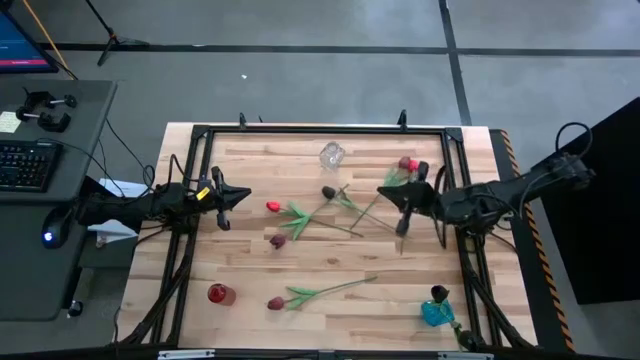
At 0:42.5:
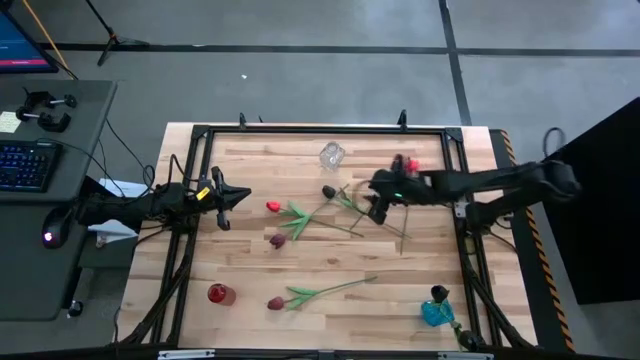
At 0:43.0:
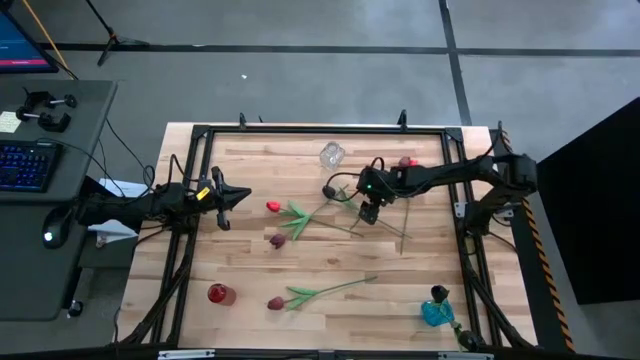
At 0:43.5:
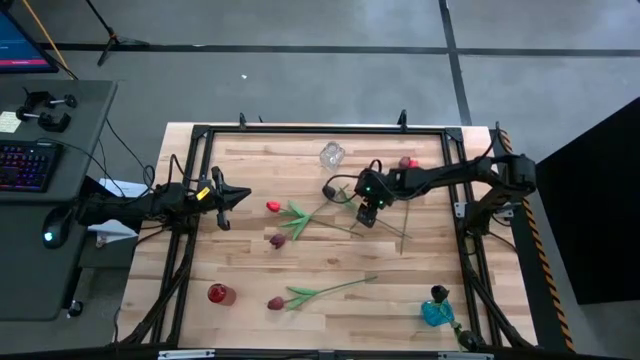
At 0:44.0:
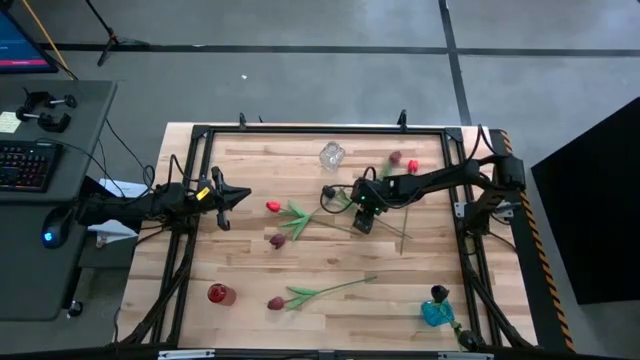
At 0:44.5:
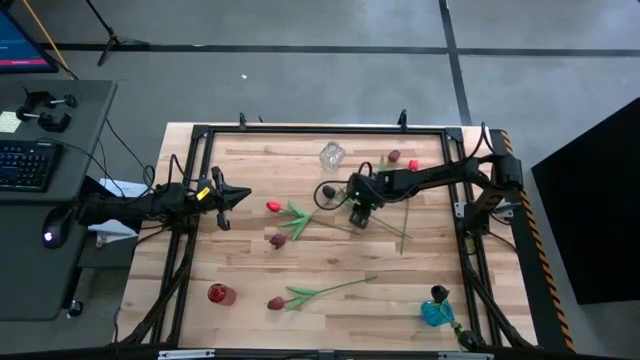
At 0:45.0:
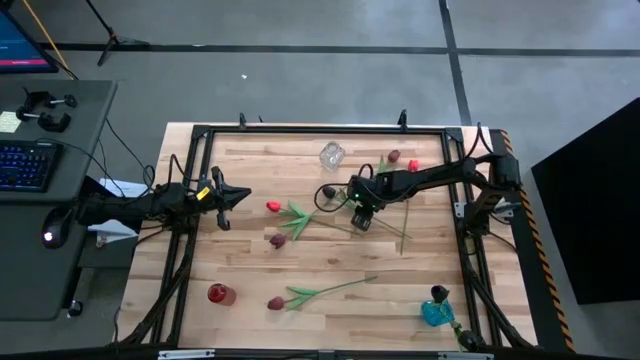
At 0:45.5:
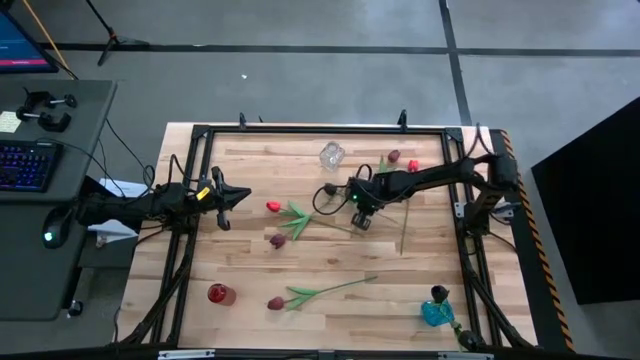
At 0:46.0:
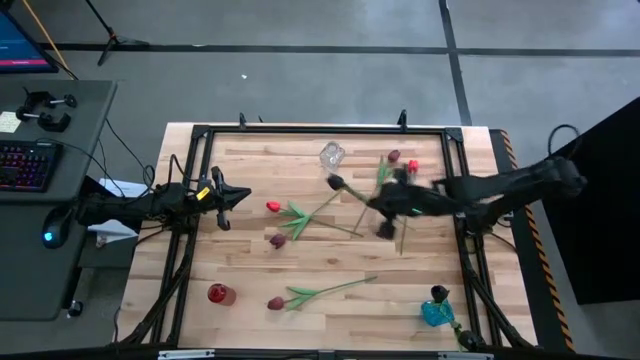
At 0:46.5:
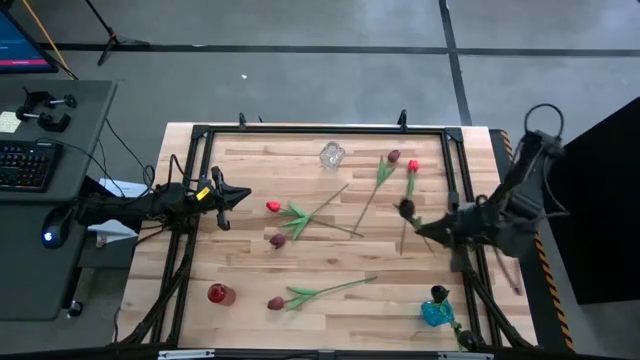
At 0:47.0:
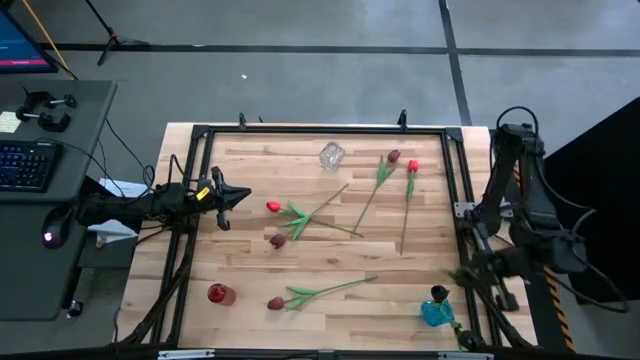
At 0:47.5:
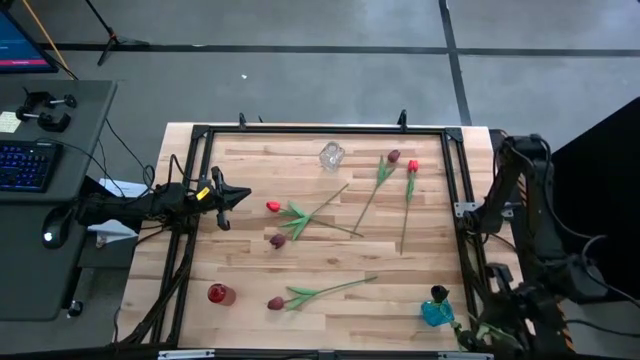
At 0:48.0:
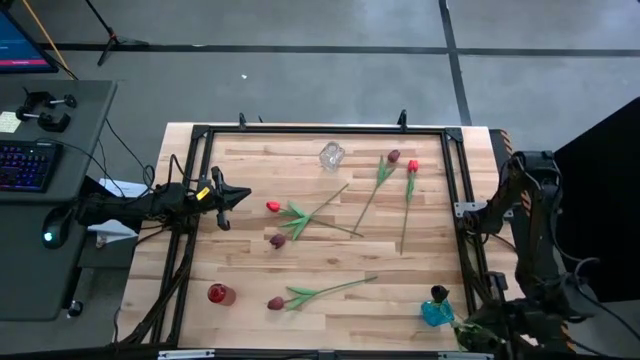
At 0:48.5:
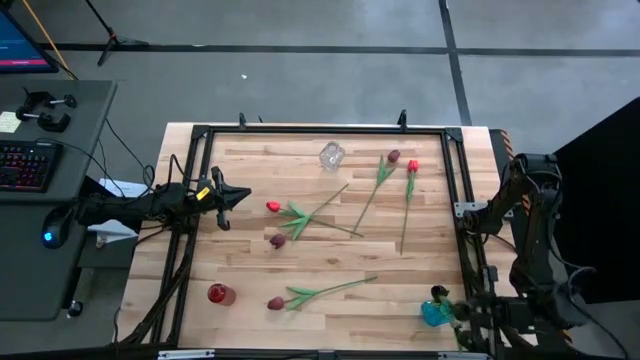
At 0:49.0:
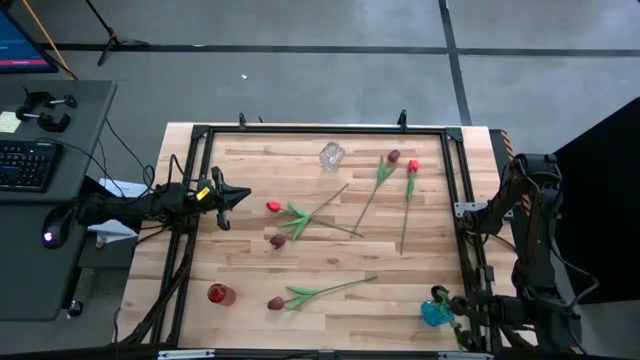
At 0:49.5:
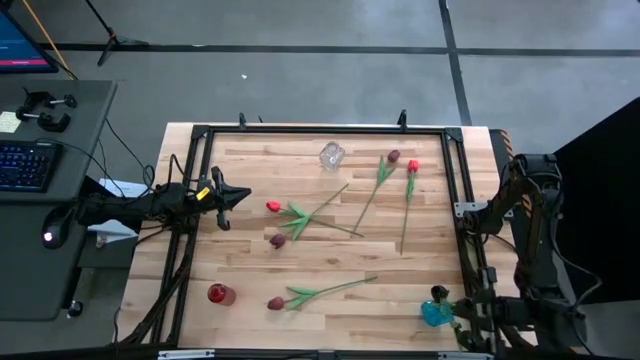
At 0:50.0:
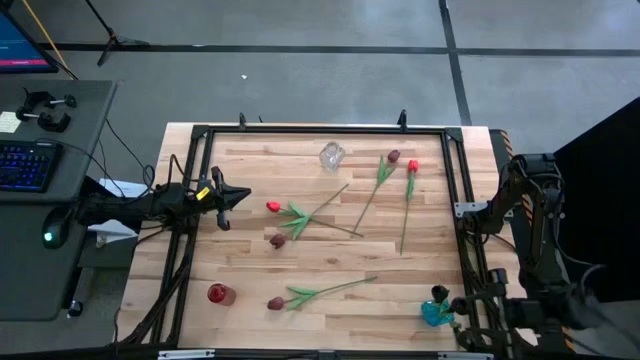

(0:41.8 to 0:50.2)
Task: Sort flowers into vase by color
Put the black flower into the blue vase

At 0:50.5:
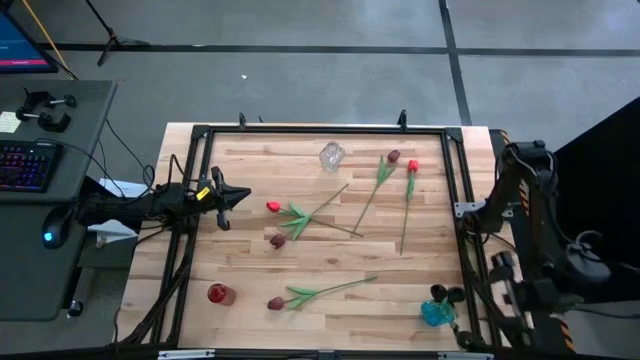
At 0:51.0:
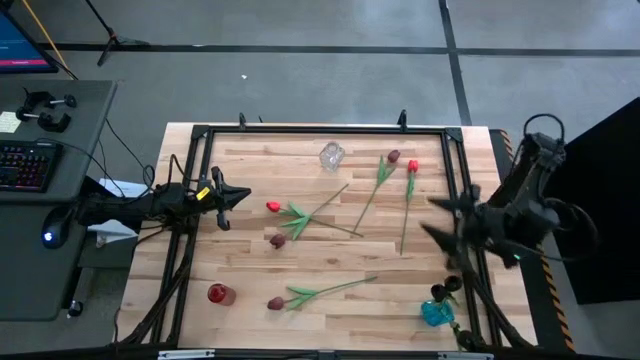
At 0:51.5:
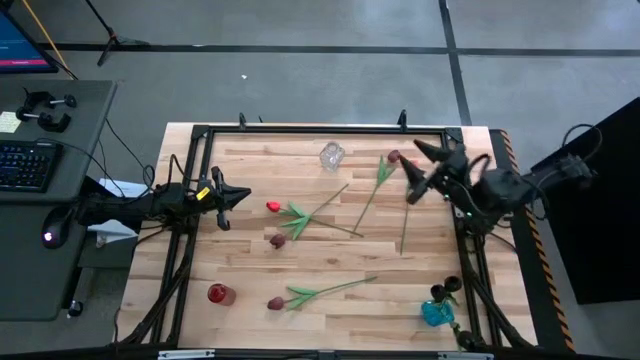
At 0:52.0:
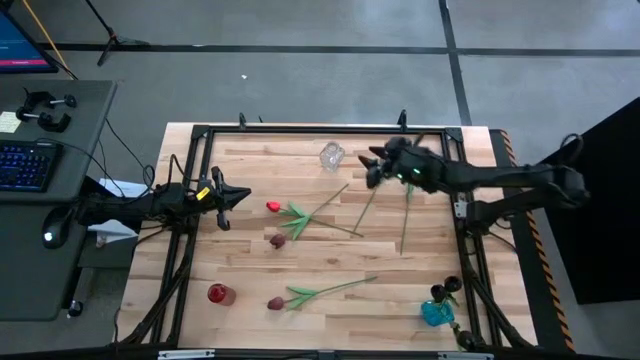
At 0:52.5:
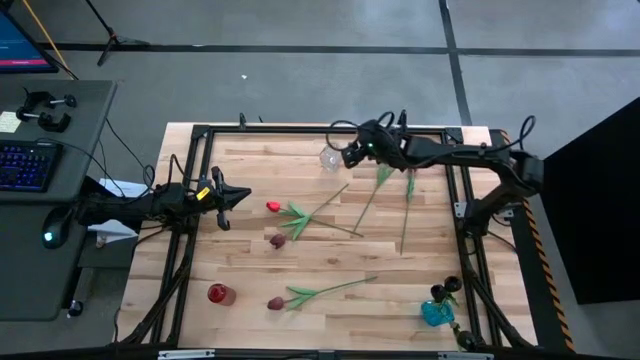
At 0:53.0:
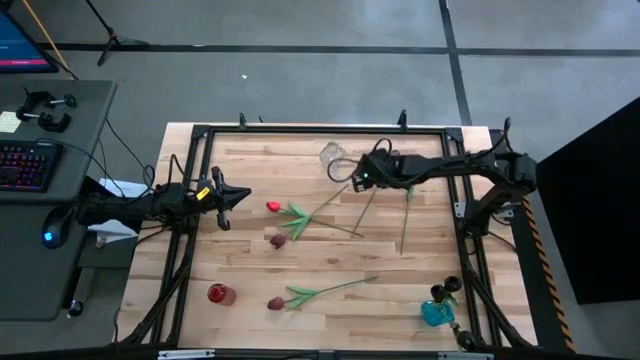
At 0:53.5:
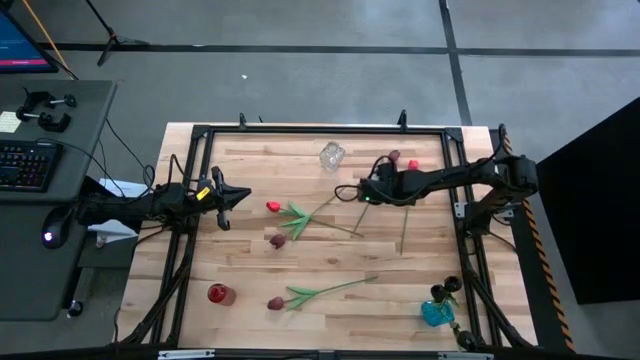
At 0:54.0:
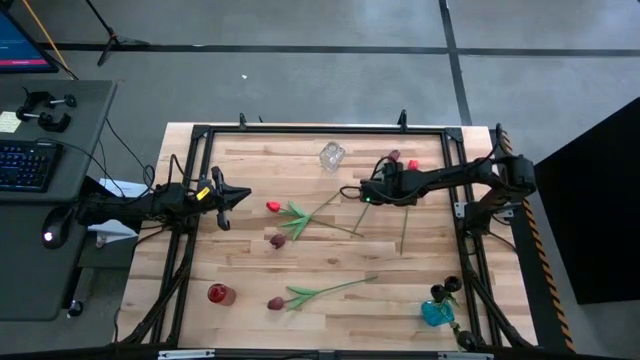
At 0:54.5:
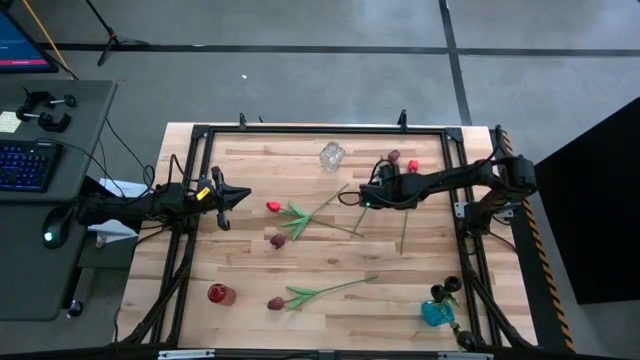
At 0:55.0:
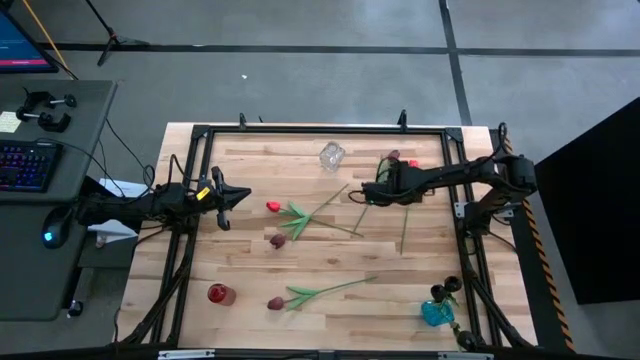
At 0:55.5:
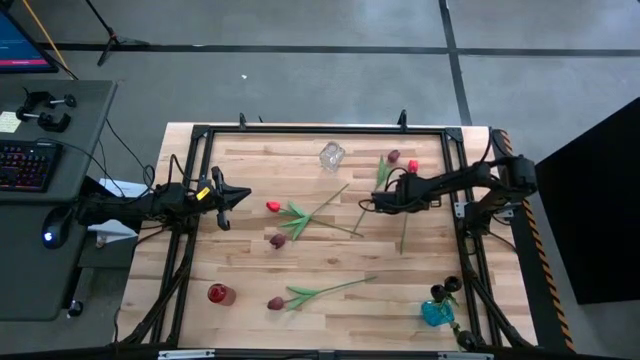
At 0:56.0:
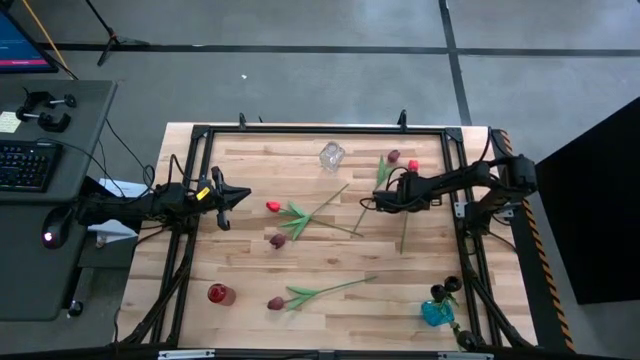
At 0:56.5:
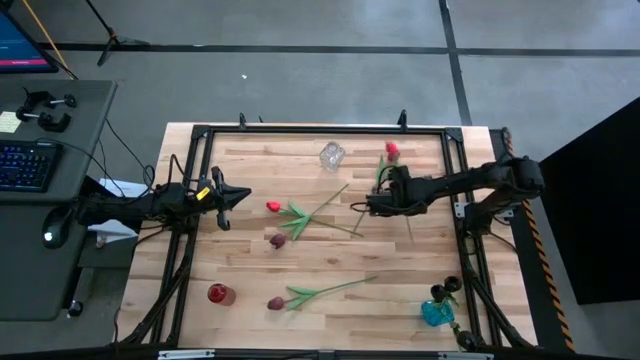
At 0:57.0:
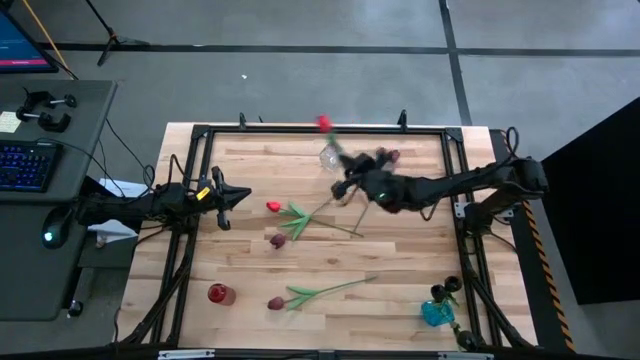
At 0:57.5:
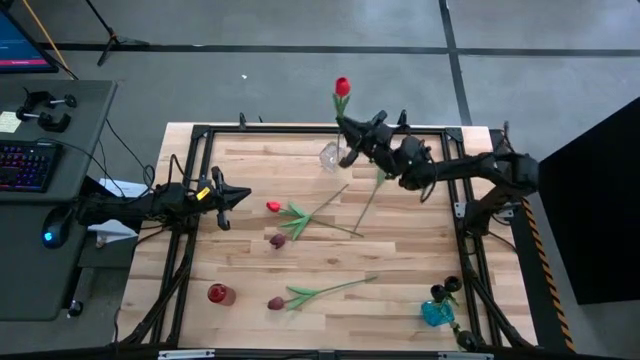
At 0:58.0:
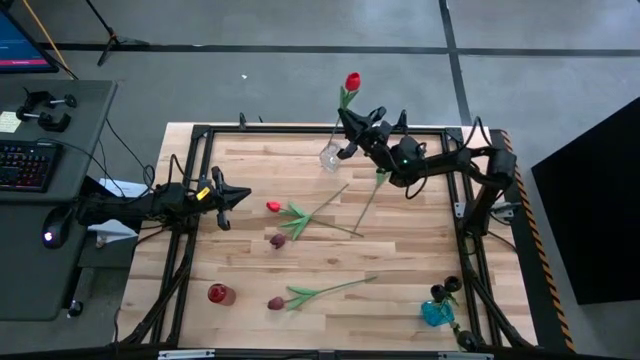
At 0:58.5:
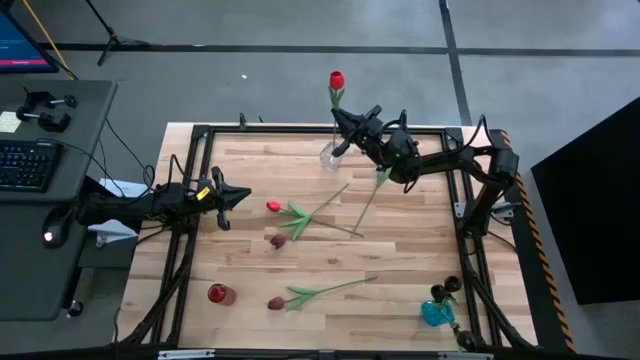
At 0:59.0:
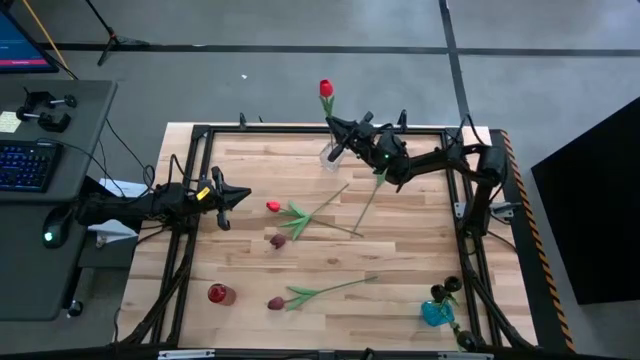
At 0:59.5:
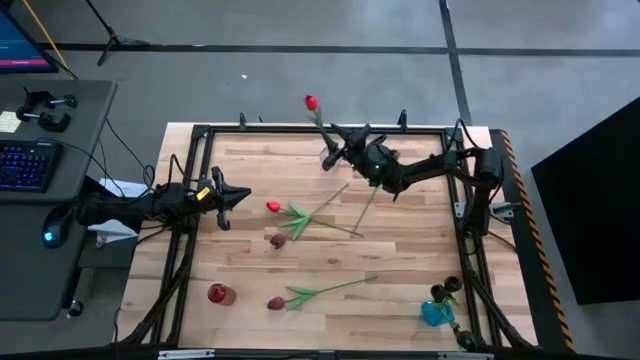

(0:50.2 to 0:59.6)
Put the right pink flower into the transparent vase
